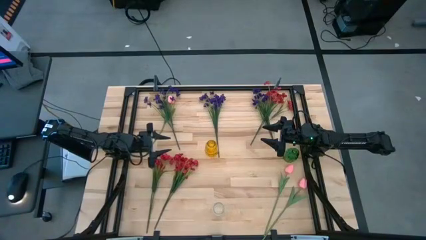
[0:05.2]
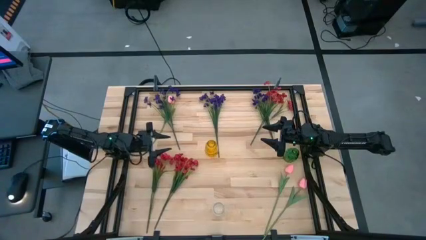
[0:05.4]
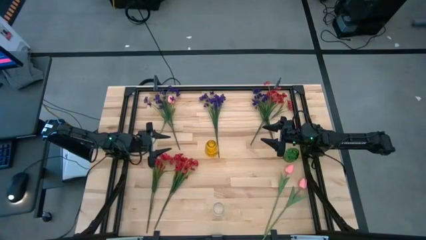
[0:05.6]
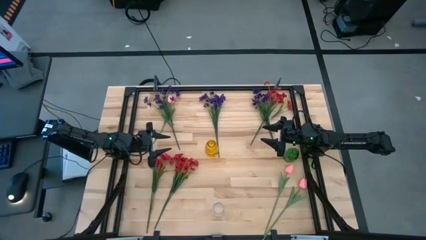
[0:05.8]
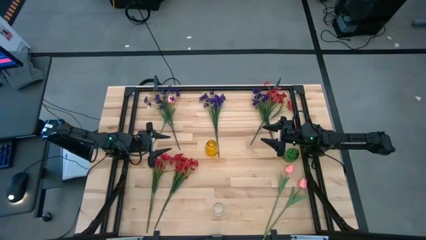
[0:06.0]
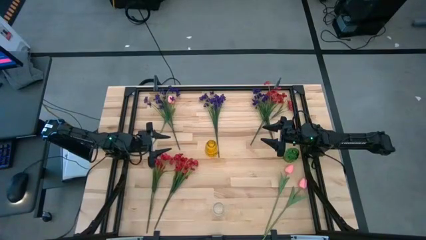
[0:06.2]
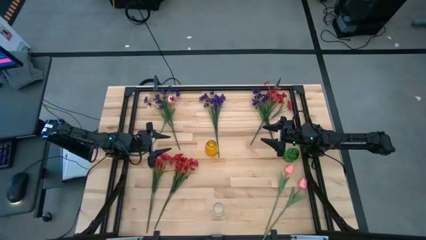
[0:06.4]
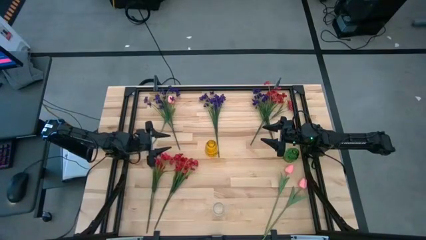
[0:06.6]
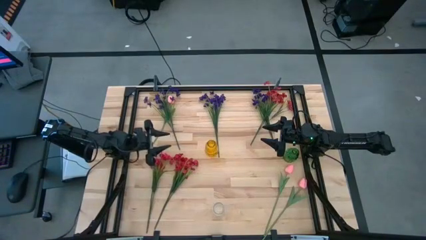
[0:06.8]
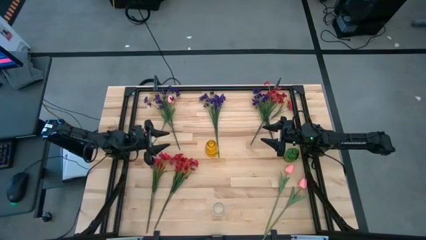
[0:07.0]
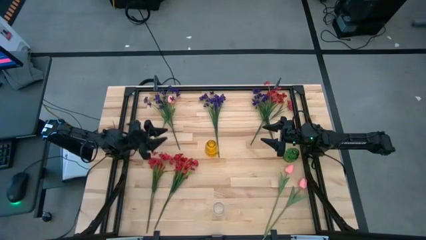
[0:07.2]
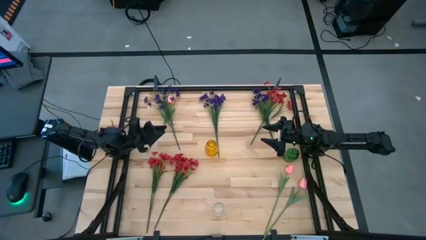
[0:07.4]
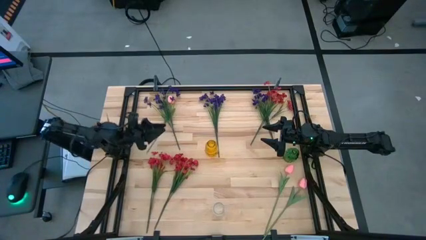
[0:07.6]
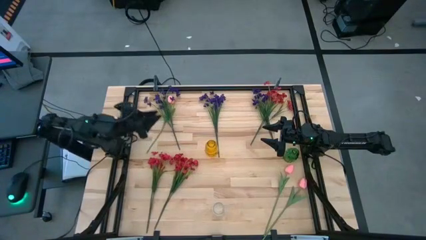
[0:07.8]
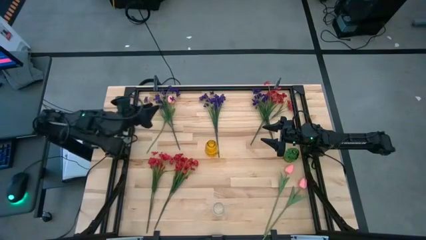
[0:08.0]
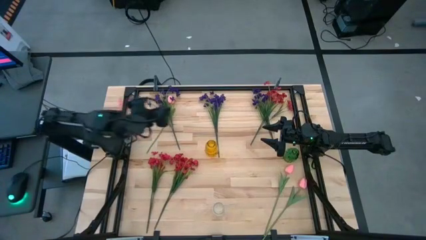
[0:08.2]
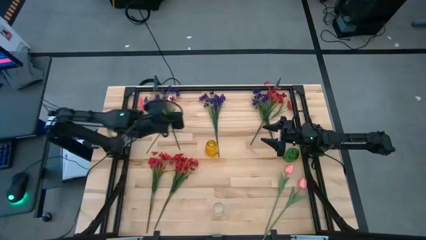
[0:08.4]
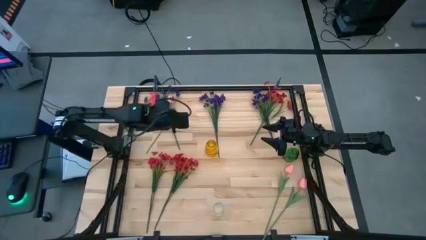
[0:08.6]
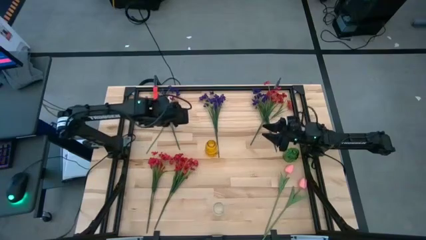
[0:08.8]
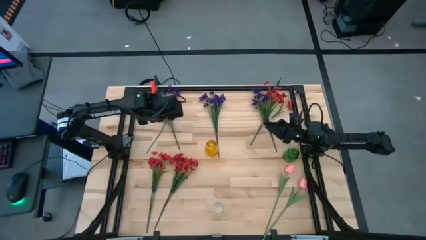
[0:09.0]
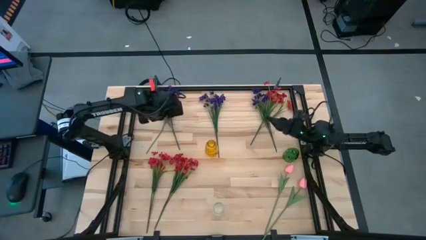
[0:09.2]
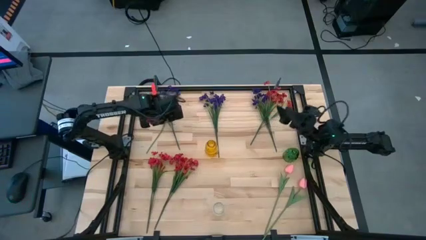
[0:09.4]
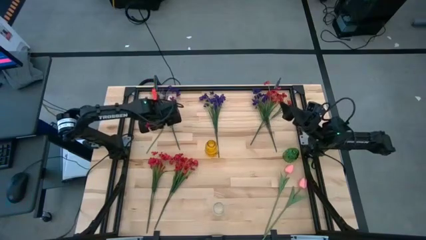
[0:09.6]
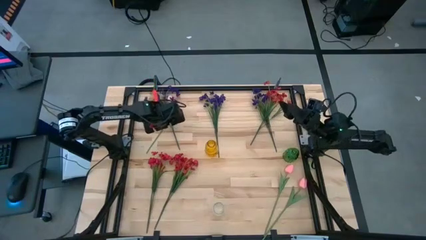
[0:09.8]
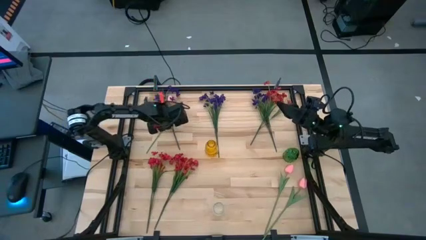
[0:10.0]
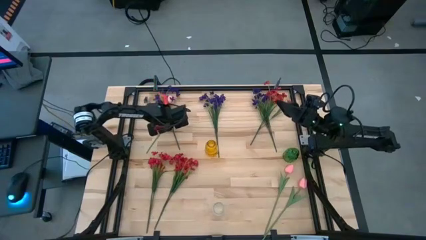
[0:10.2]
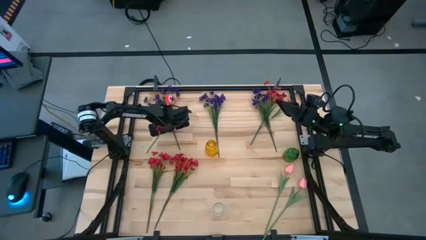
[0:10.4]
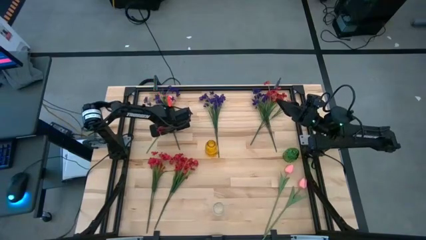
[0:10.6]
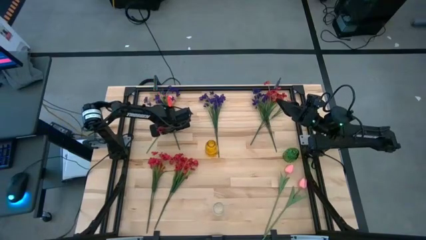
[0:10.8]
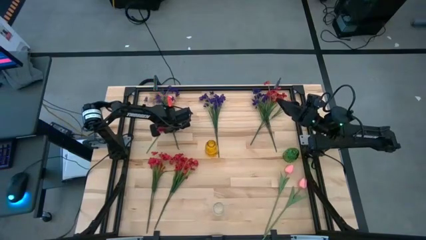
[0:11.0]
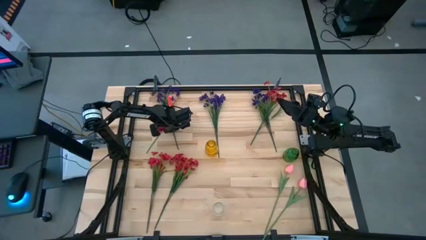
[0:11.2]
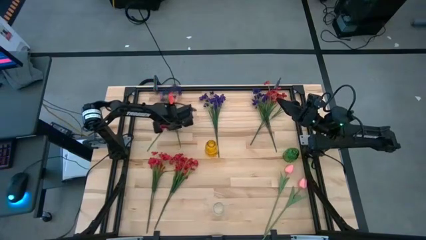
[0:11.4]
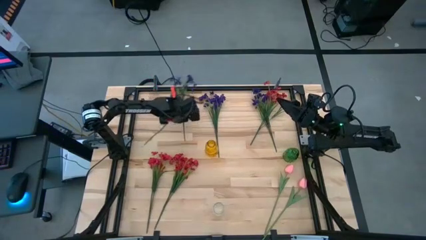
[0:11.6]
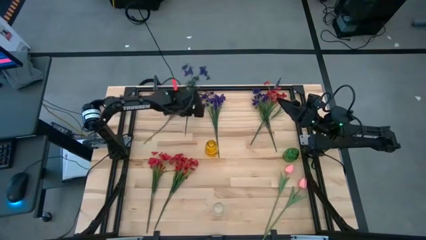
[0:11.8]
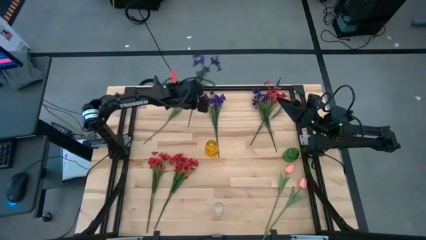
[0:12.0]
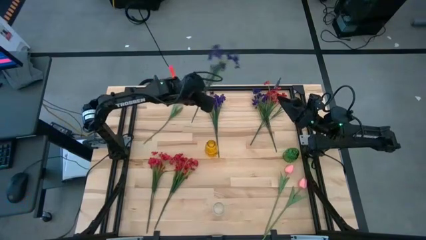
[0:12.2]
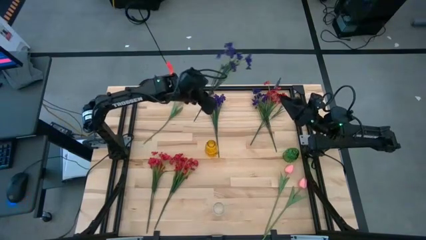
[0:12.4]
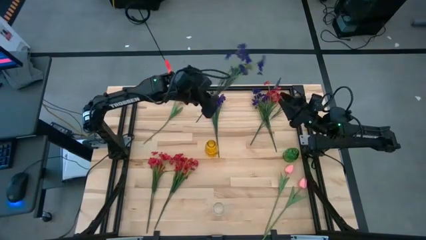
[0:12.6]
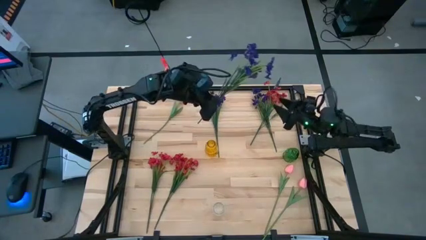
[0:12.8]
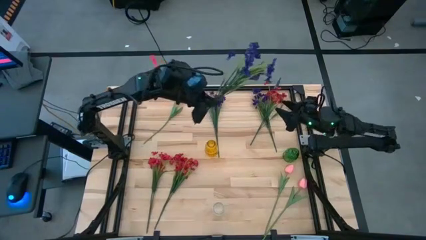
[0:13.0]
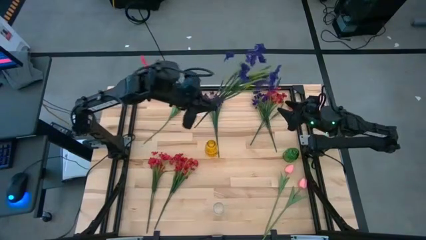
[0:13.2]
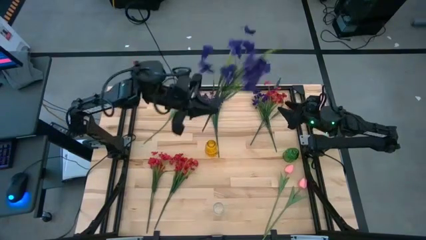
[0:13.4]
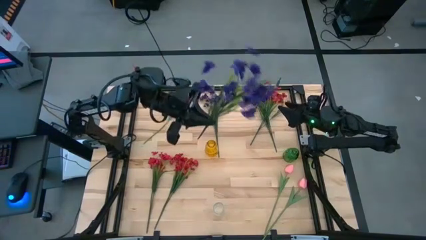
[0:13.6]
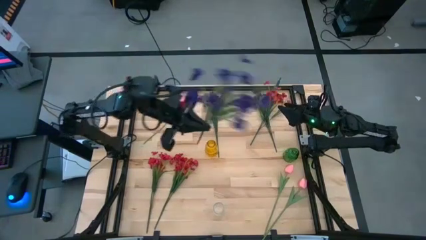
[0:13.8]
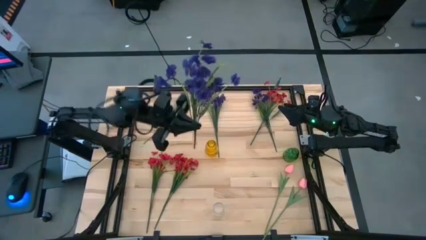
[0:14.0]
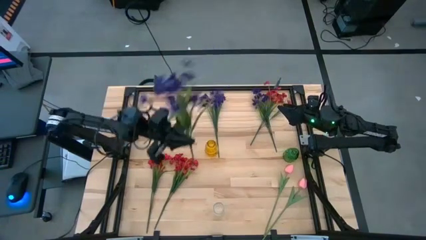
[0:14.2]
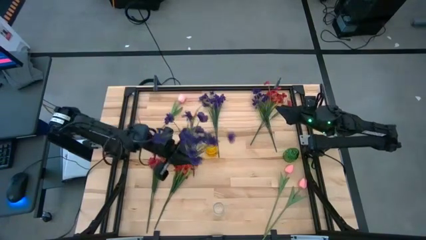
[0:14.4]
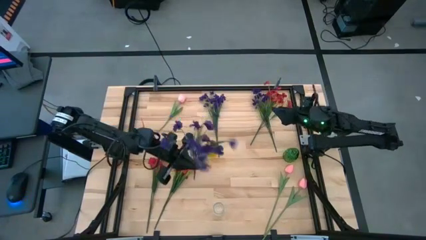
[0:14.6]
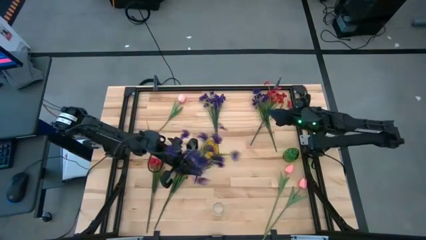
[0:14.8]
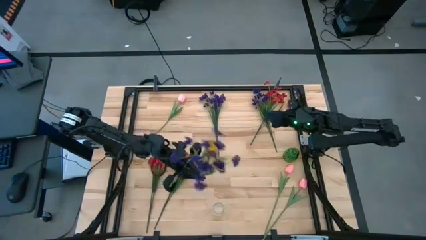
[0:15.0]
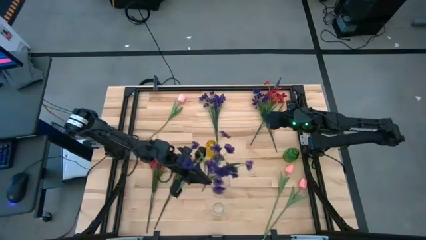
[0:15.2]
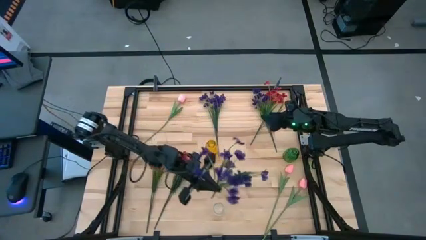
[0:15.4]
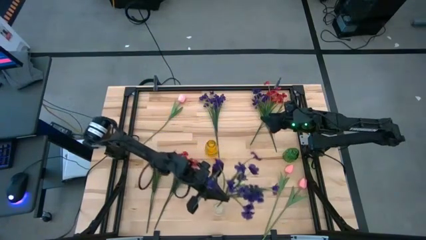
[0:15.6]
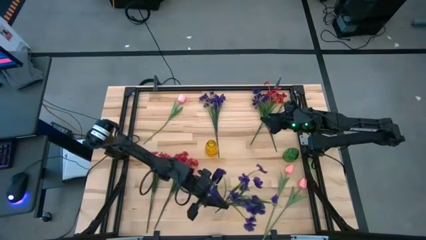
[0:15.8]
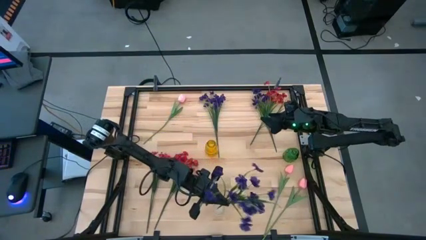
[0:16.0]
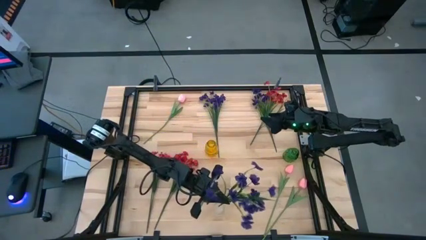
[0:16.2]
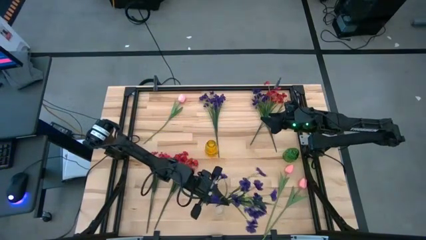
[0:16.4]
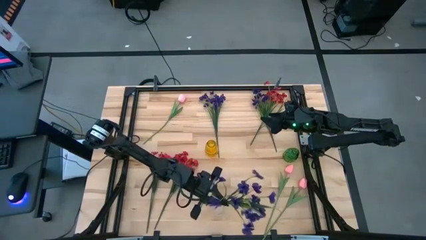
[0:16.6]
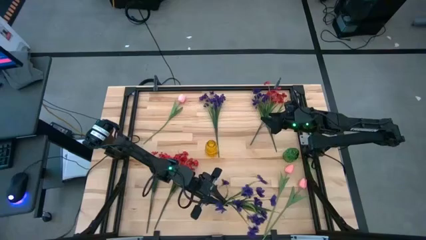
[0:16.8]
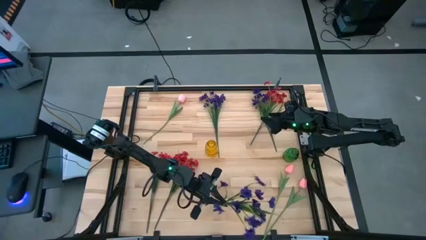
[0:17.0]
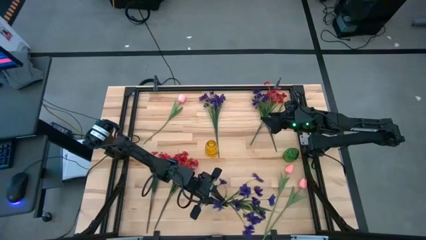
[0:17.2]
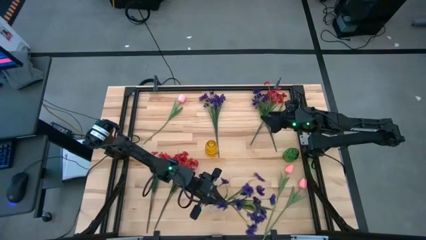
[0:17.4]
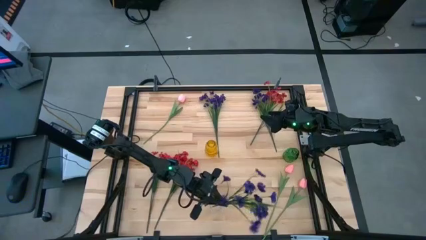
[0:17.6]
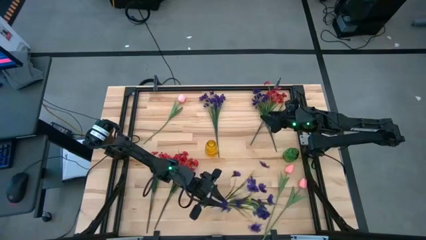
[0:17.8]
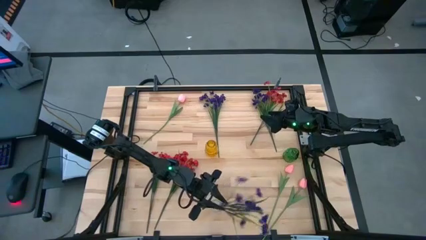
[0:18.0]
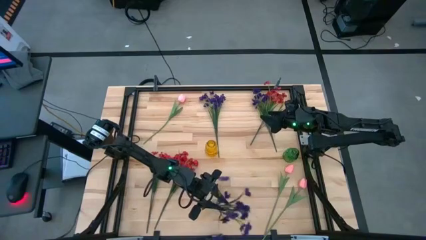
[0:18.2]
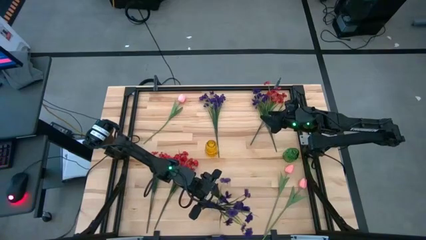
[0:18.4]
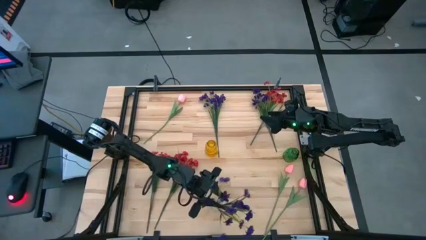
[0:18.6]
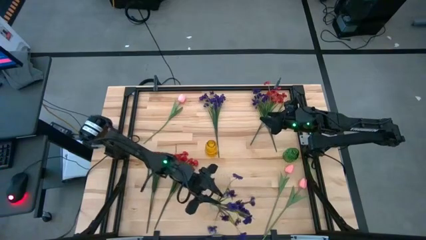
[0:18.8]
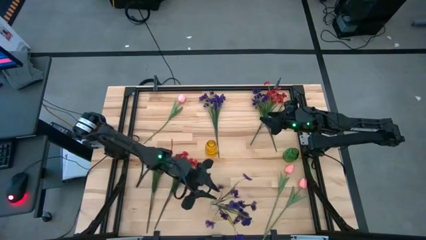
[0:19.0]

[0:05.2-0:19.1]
Task: Sort flowers into vase by color
Put the left purple flower into the transparent vase
